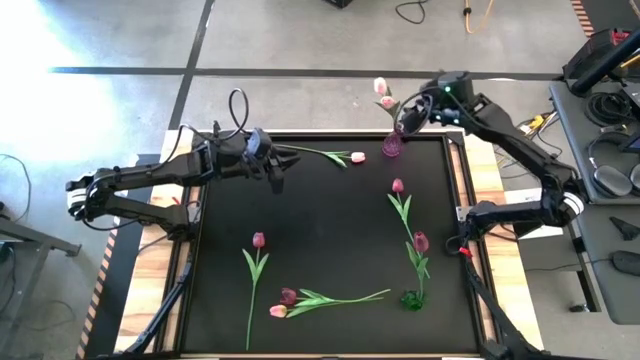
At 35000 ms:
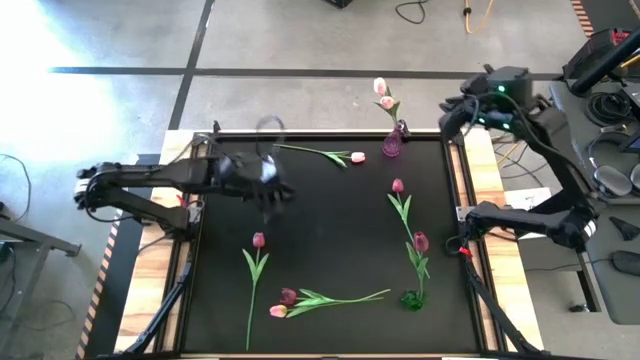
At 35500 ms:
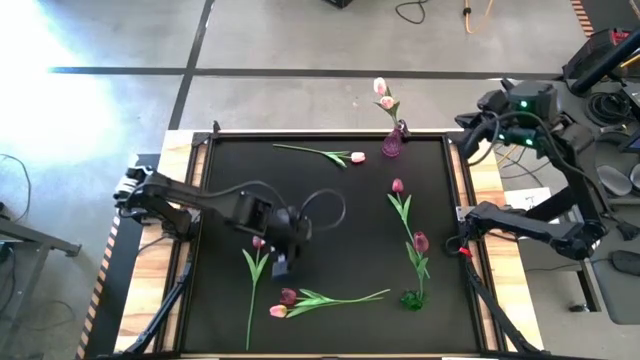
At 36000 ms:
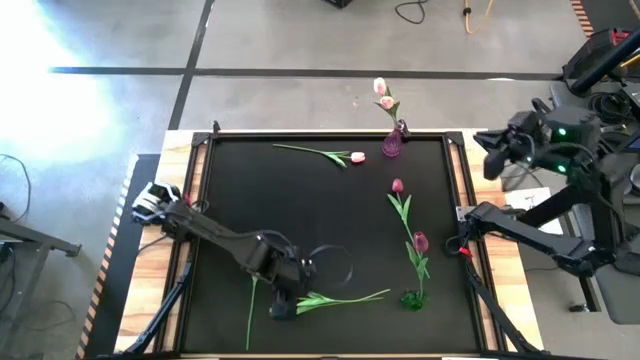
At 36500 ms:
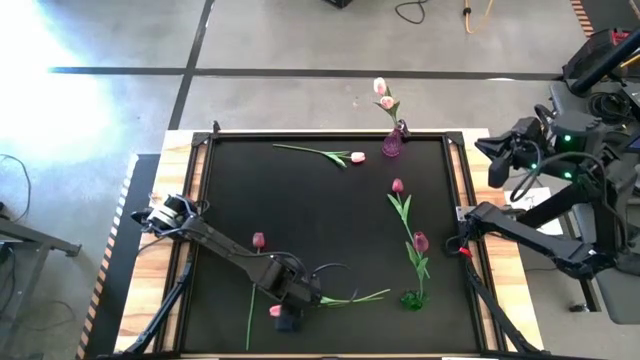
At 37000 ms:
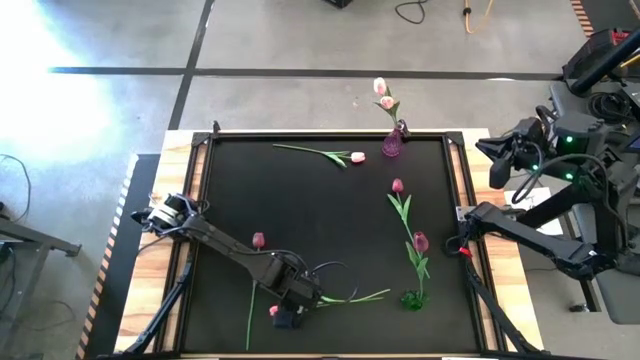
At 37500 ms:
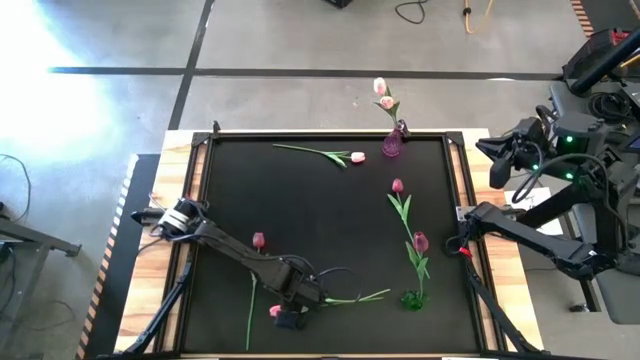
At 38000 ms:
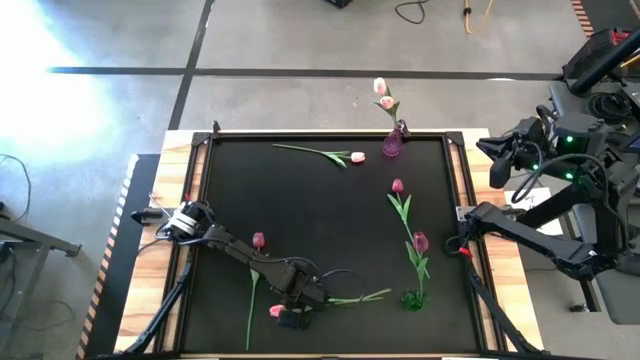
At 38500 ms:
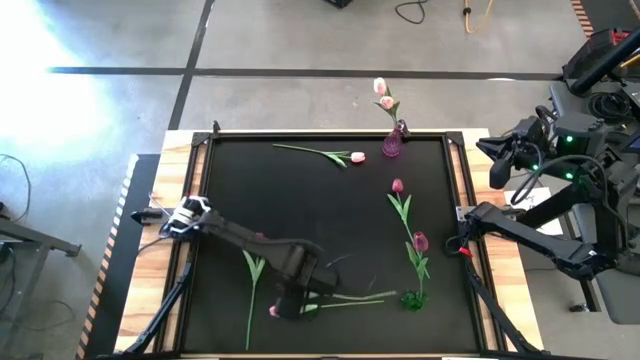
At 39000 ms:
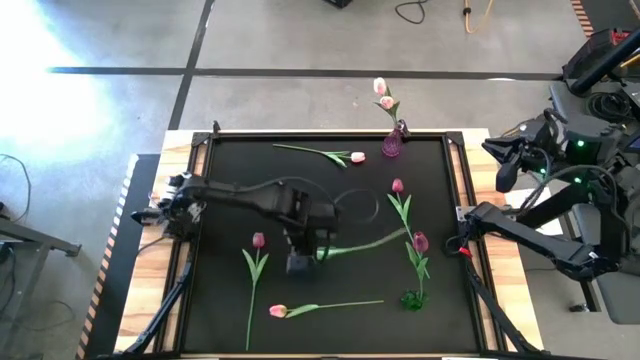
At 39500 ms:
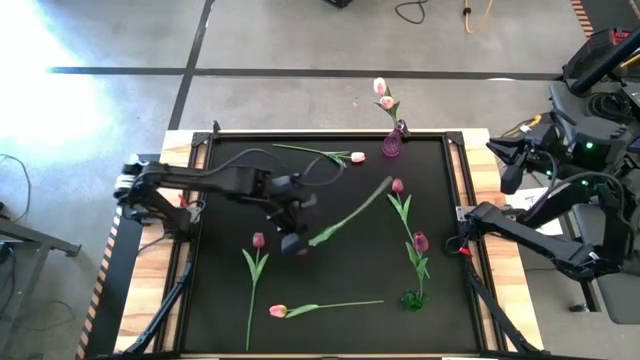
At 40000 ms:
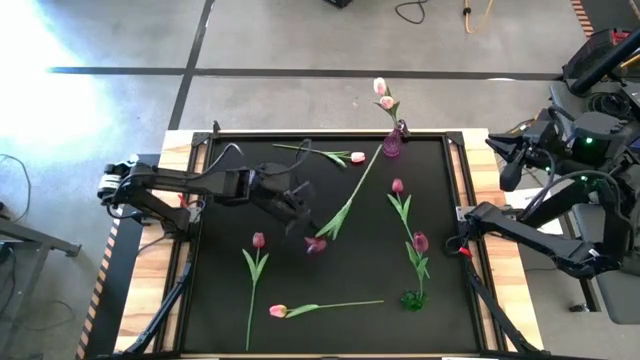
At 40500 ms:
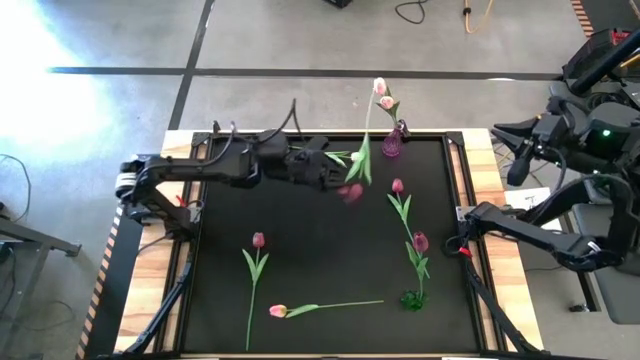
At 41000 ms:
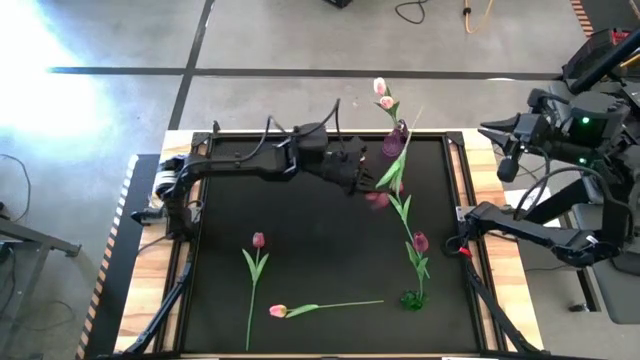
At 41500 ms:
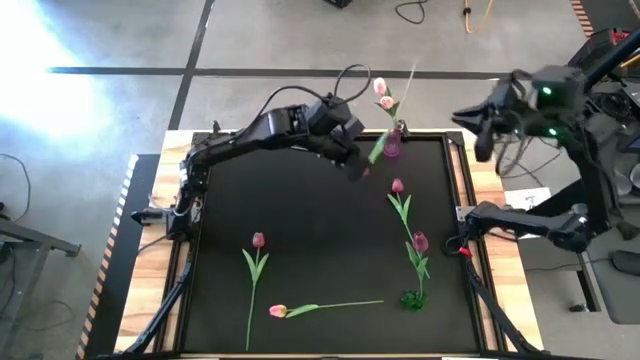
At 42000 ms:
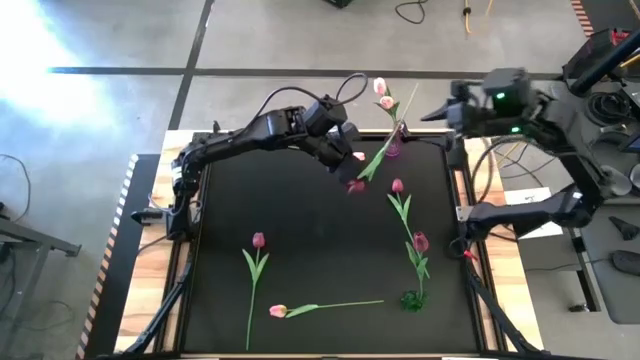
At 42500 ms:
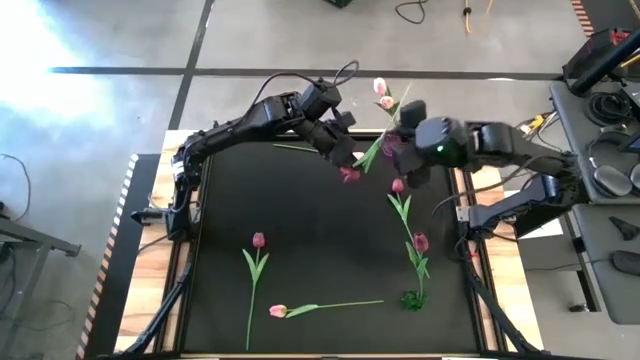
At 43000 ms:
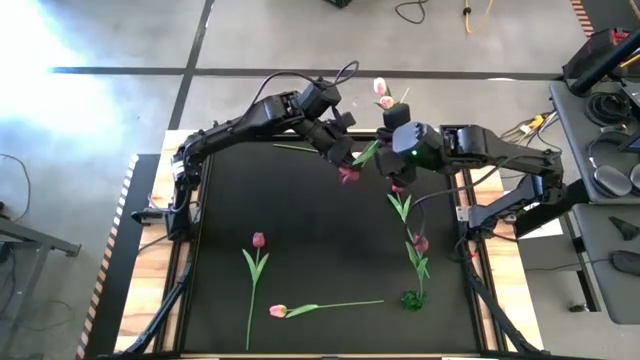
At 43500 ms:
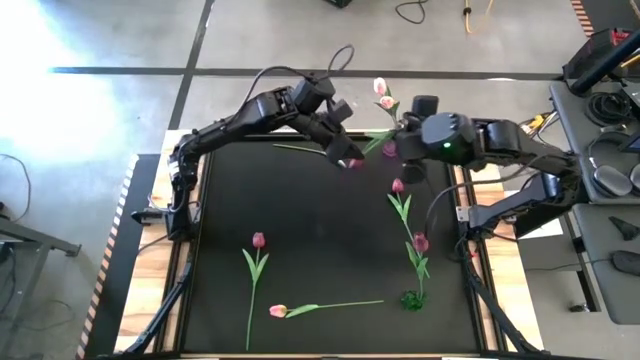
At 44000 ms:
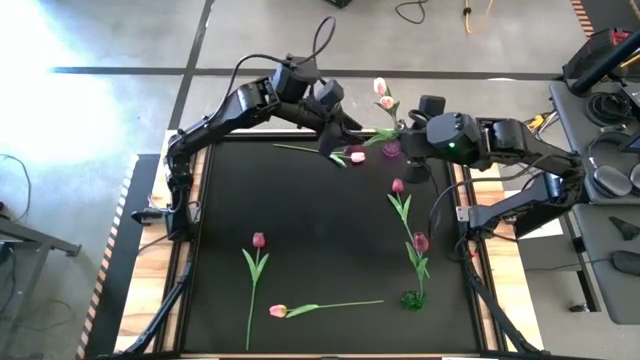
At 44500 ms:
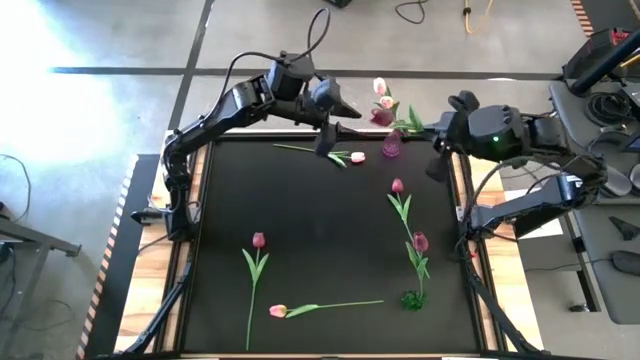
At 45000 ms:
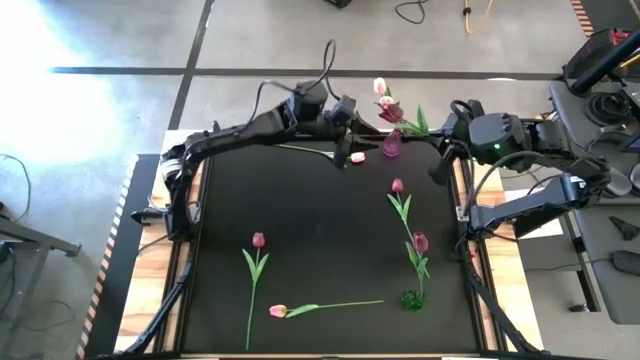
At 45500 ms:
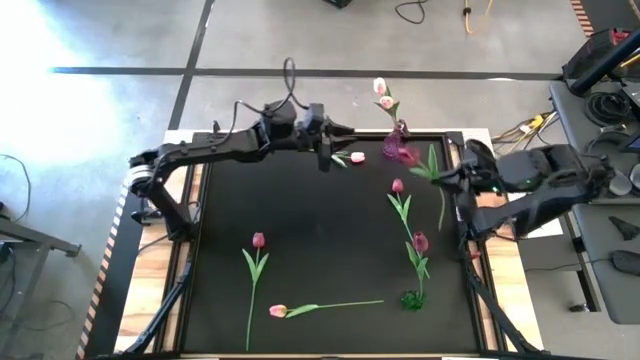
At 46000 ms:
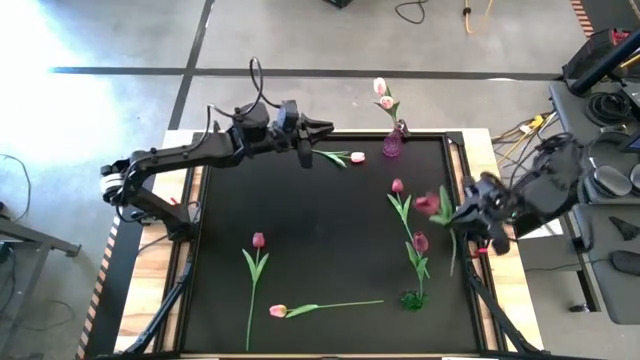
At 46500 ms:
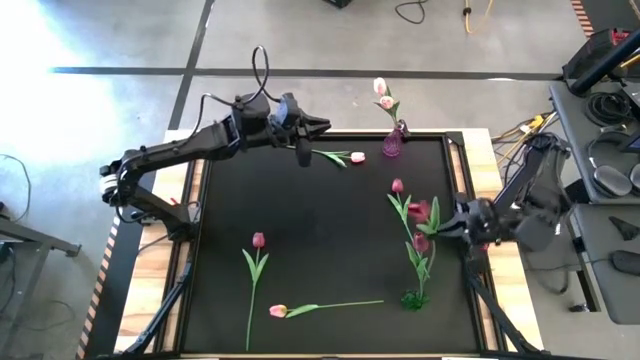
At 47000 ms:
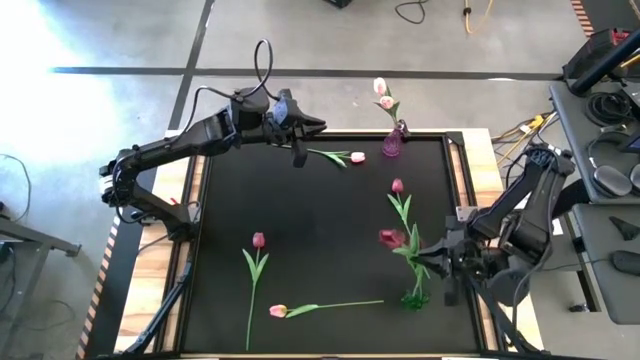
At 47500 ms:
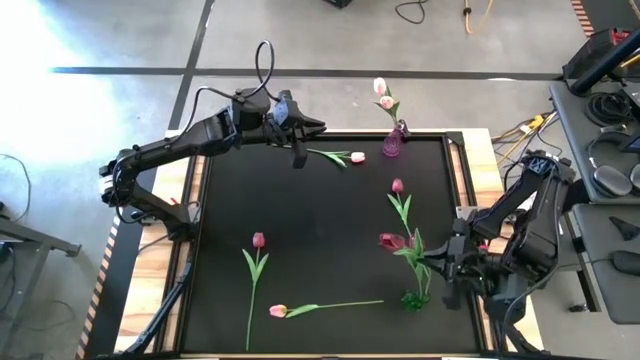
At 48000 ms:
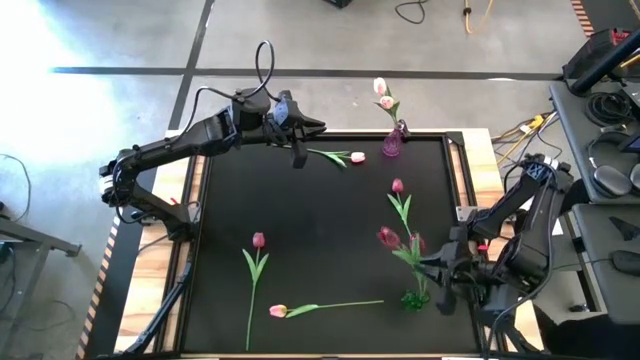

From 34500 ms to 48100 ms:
Task: Sort flowers into vase by color
Put the bottom red tulip into the transparent green vase

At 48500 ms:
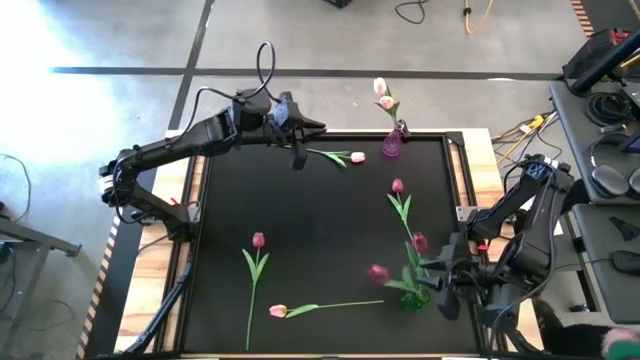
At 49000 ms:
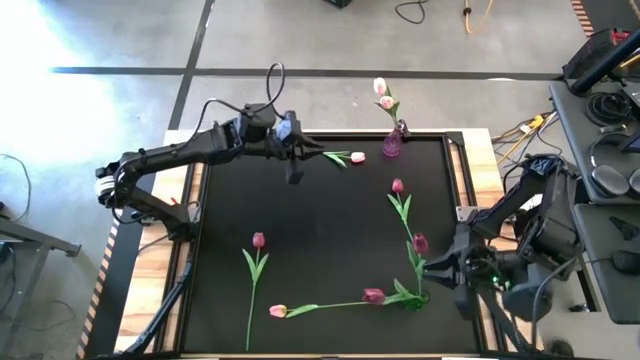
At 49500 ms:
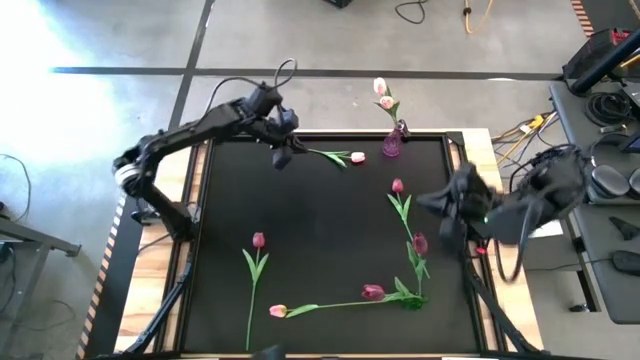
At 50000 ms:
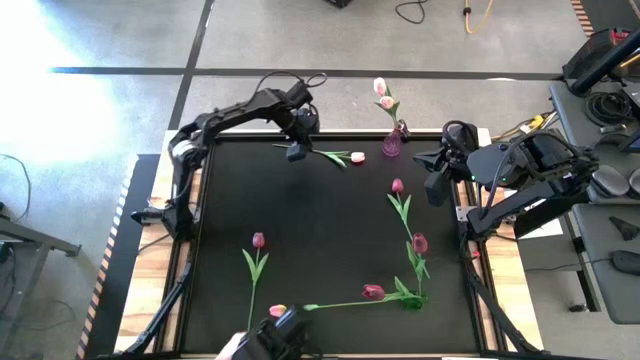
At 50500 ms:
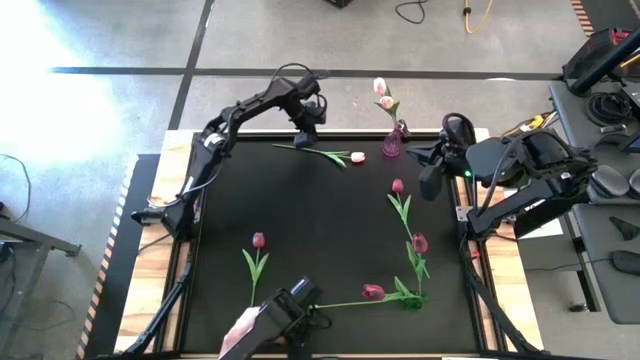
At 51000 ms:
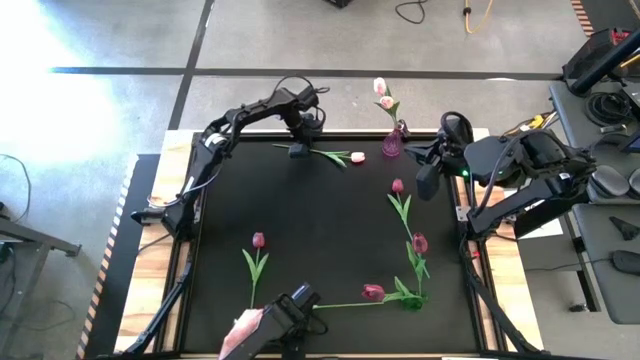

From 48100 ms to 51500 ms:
Put the top pink tulip into the transparent pink vase

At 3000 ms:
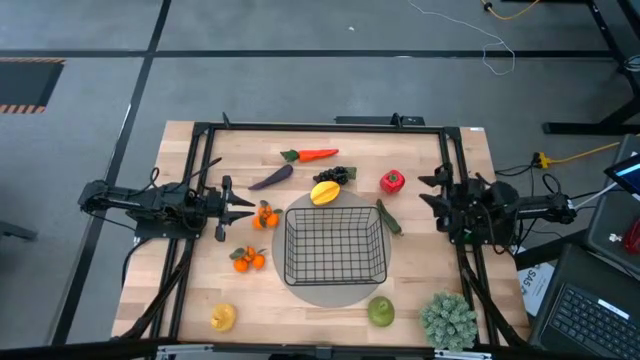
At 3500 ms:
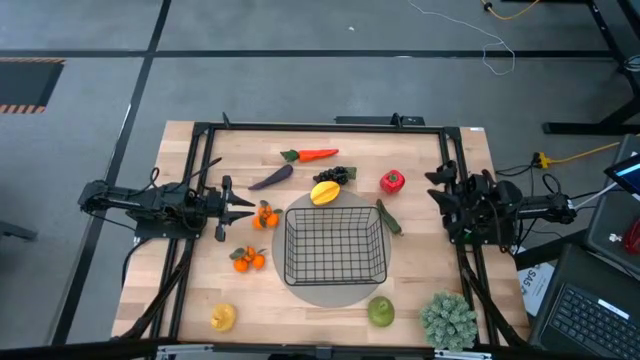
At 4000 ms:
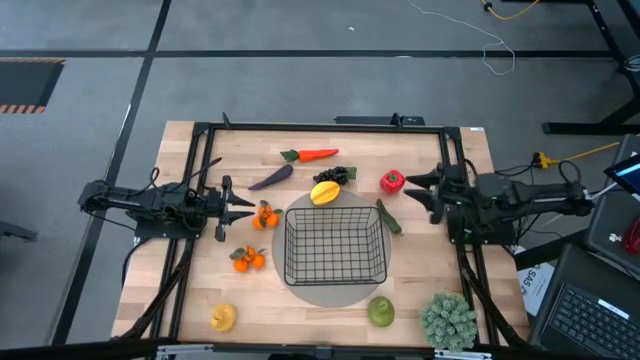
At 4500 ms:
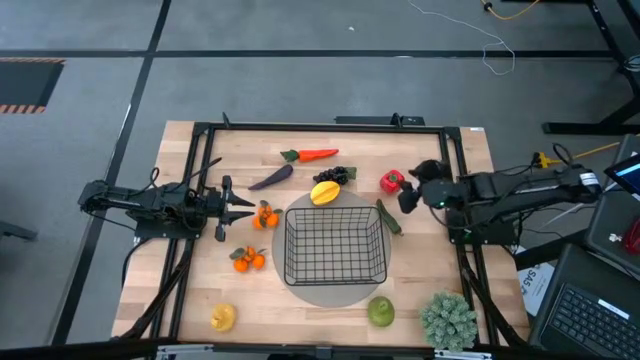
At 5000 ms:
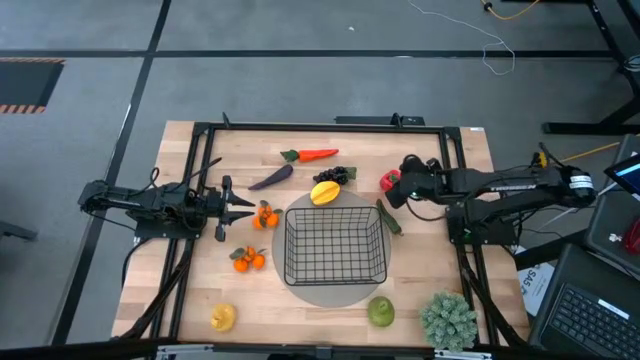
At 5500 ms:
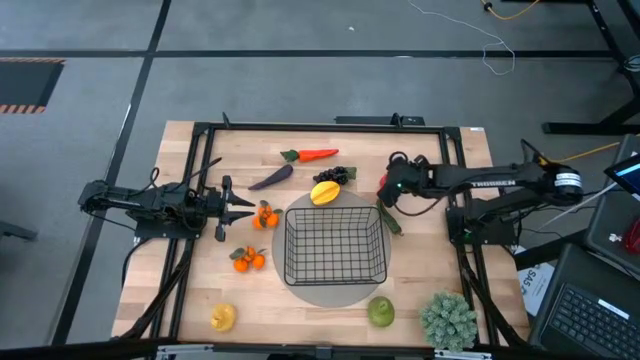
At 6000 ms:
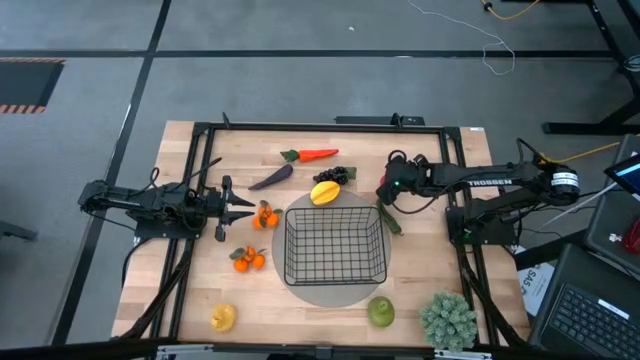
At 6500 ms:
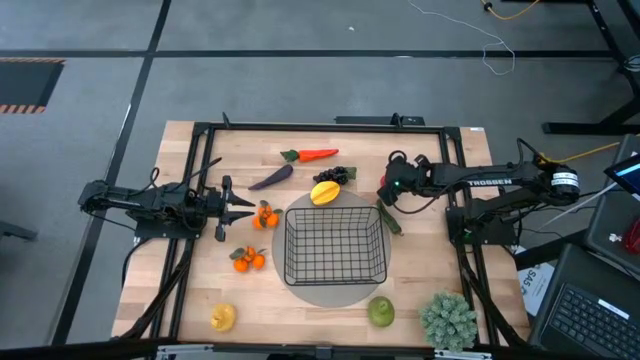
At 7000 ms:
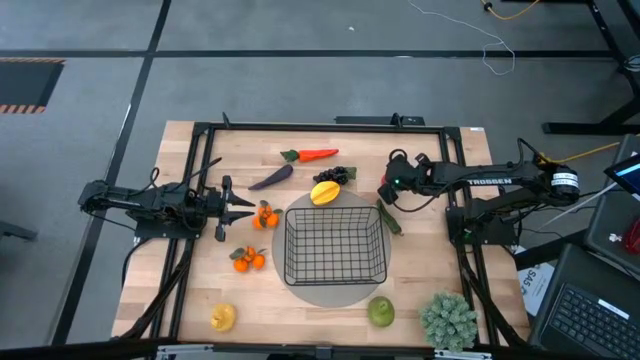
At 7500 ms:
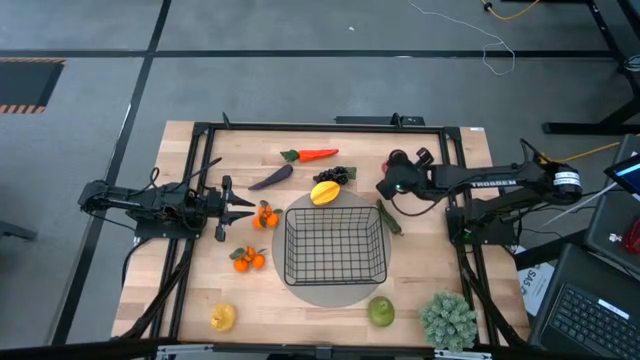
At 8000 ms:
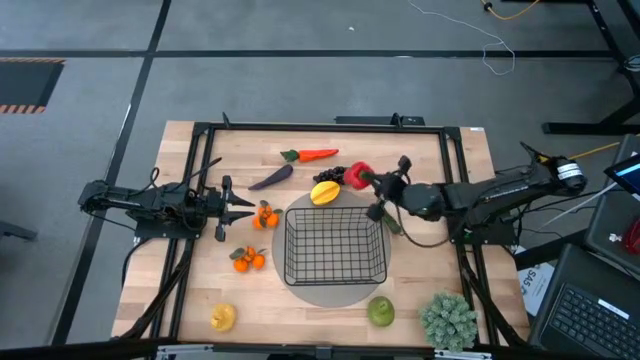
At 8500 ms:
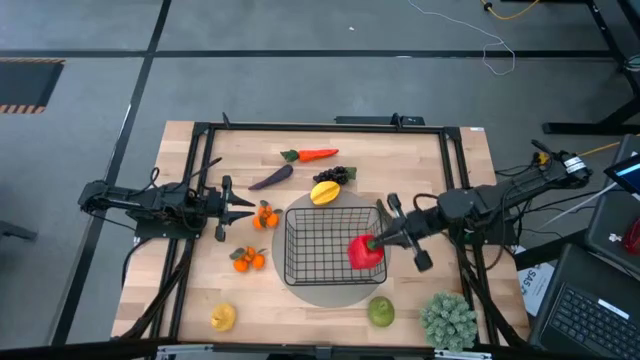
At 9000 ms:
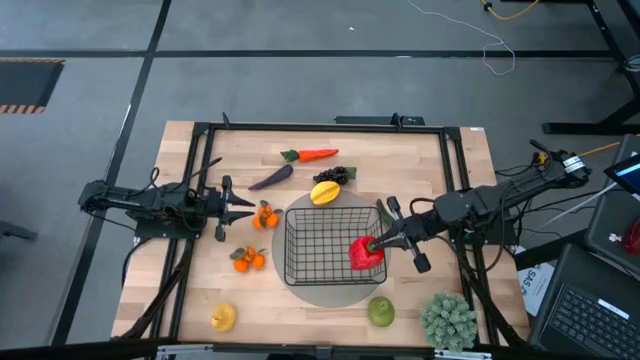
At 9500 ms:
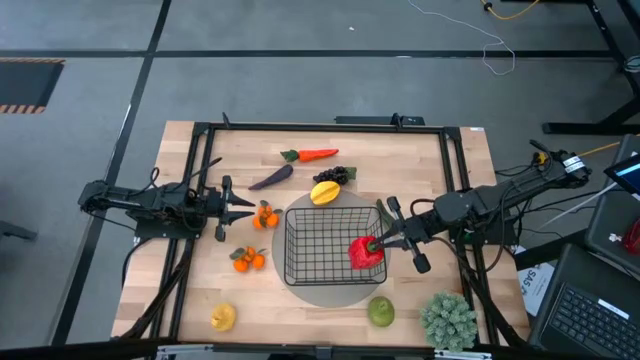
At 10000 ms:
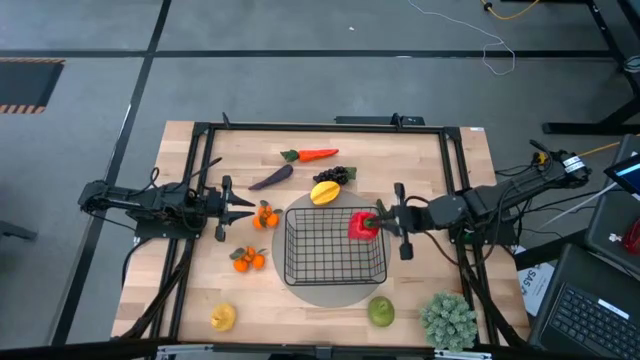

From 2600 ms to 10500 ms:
Task: Build produce basket
Put the red bell pepper into the black wire basket
